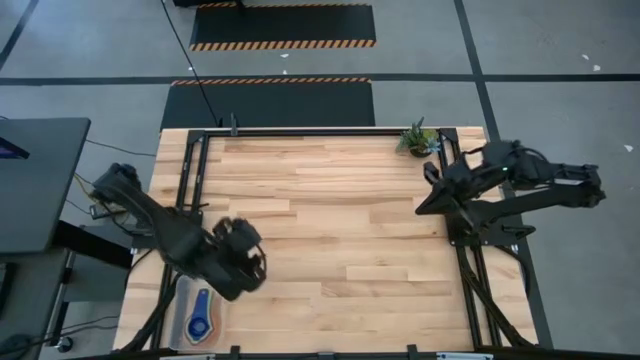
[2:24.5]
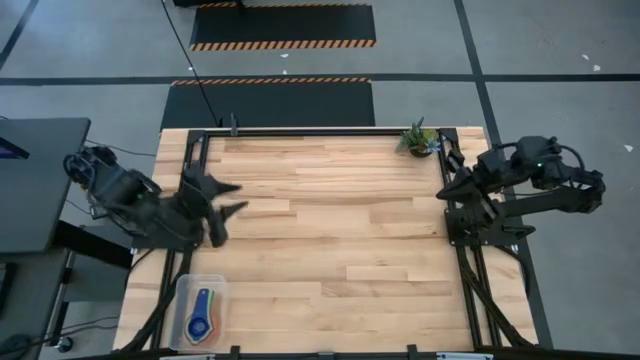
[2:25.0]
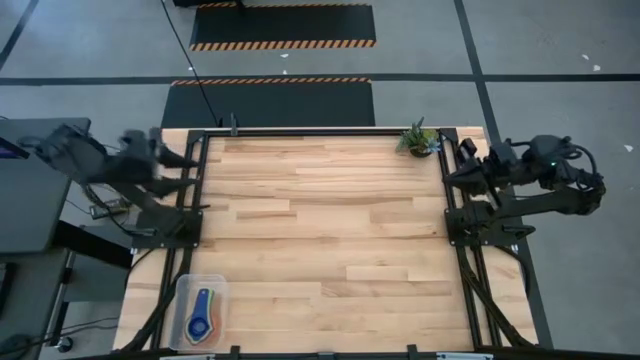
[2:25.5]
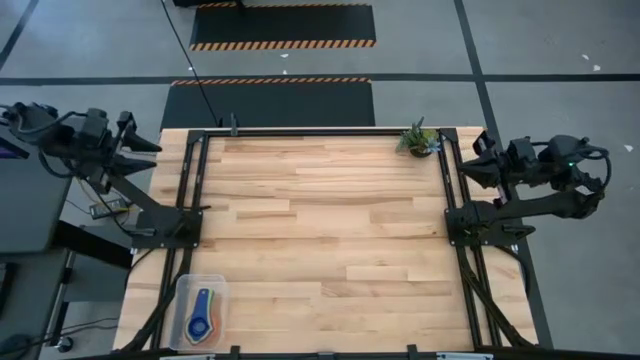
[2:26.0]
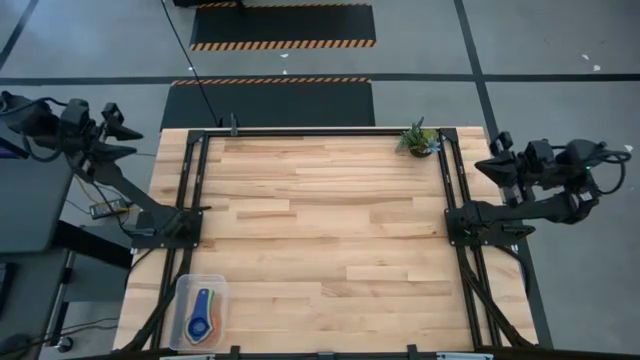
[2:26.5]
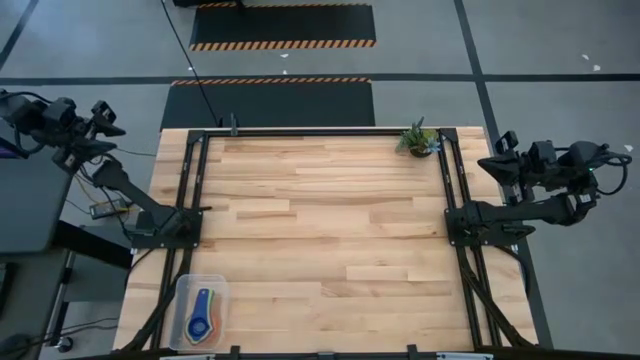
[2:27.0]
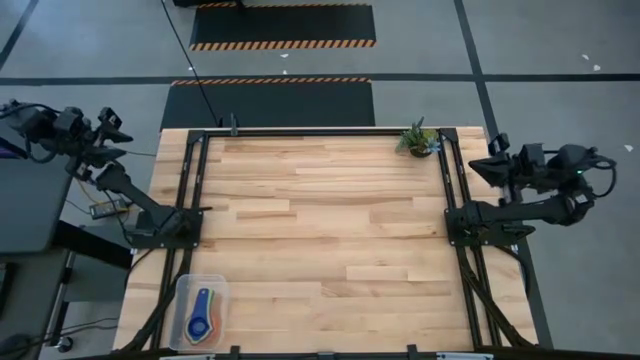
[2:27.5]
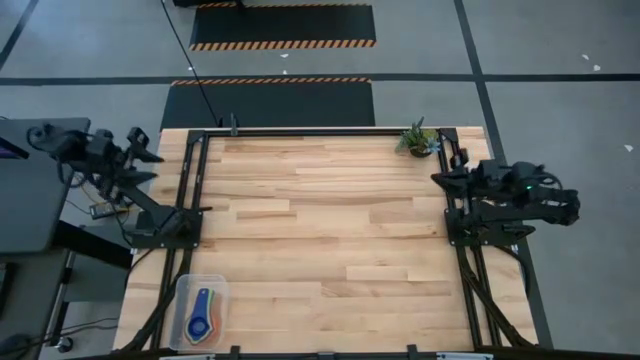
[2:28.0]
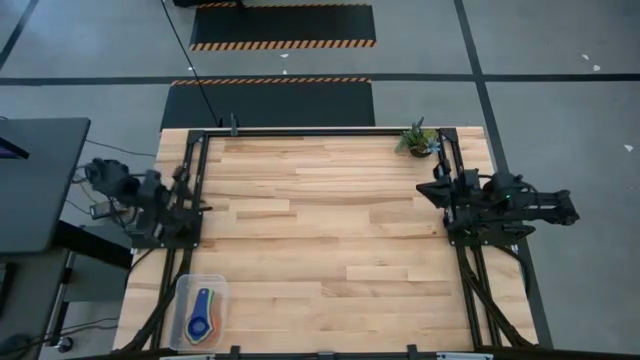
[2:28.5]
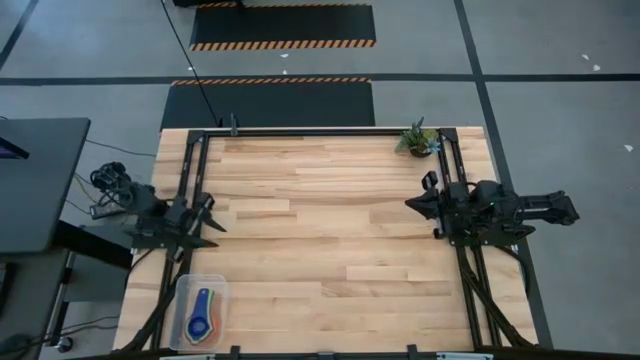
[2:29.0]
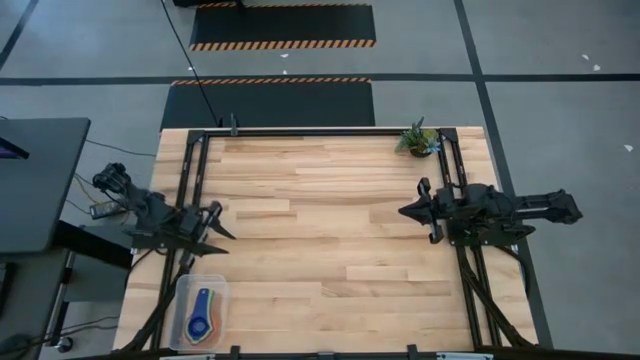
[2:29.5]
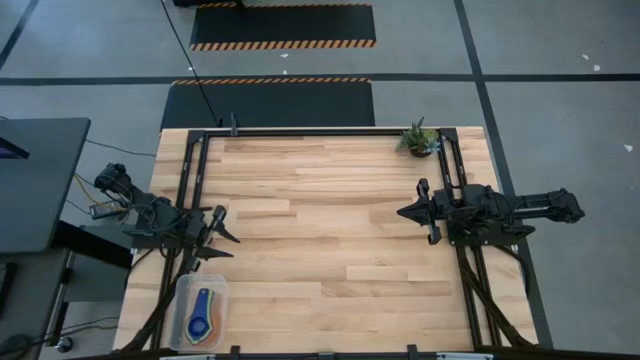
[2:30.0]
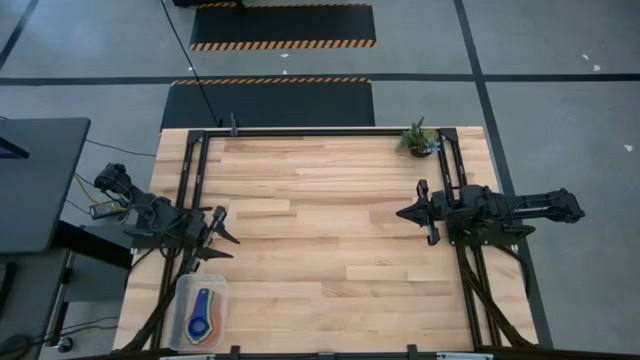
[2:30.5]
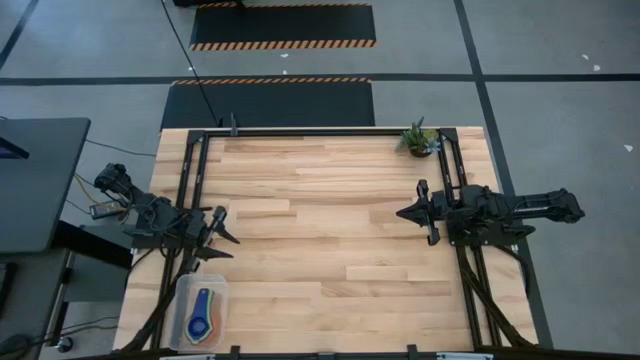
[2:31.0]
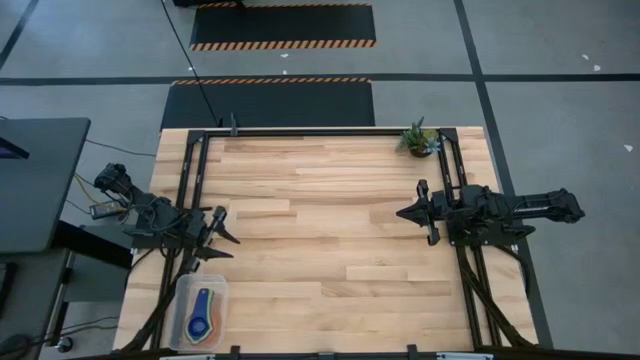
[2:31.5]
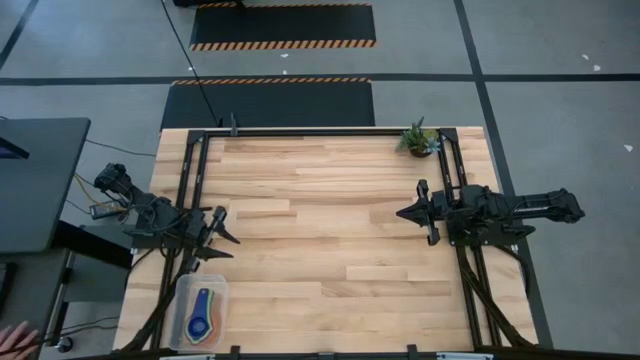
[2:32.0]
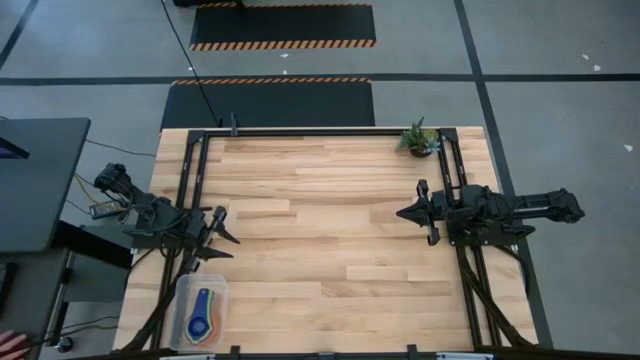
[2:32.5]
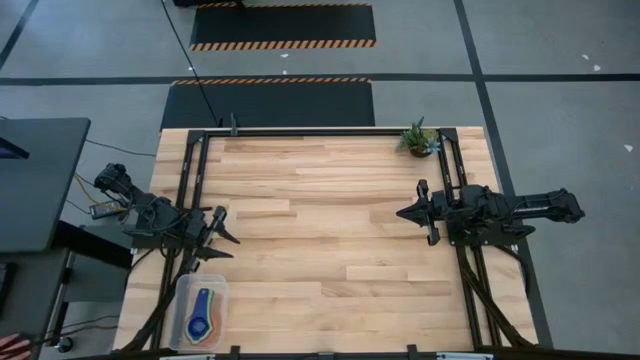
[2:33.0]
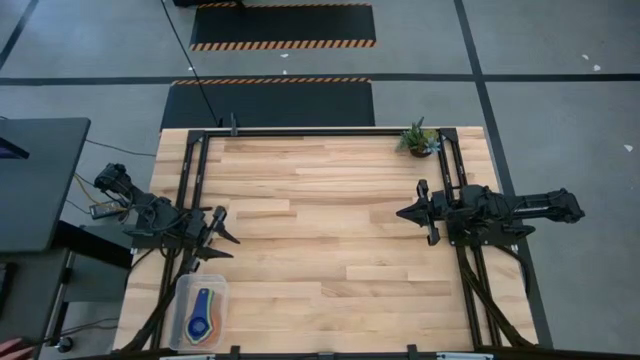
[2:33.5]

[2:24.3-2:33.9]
Task: Nest measuring cups in basket
Return to Home Position

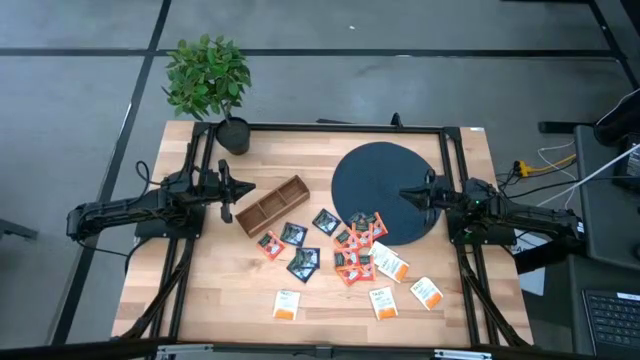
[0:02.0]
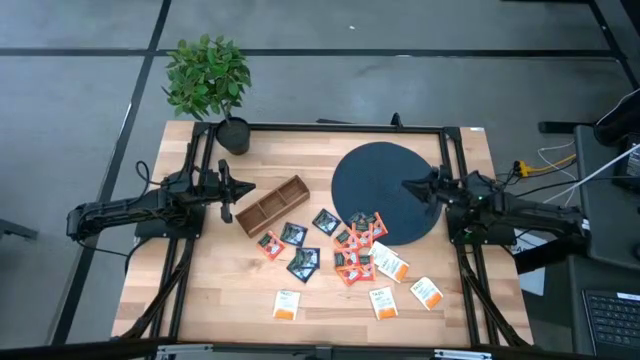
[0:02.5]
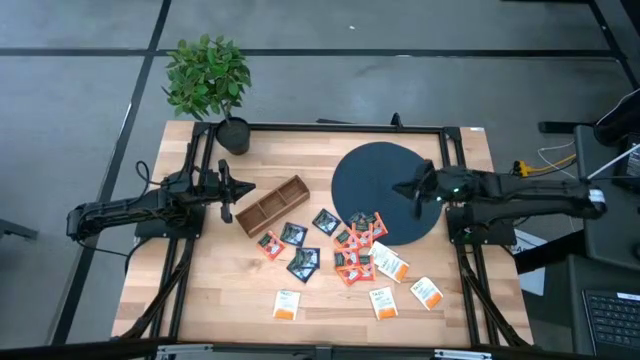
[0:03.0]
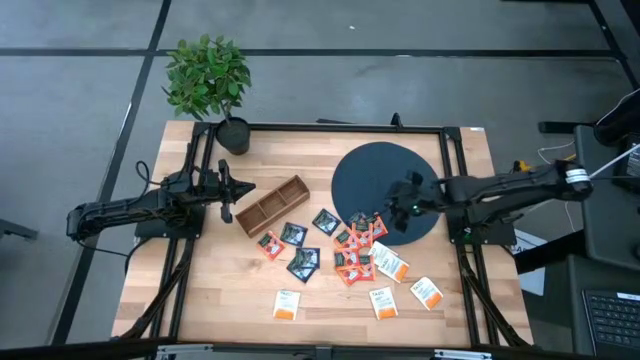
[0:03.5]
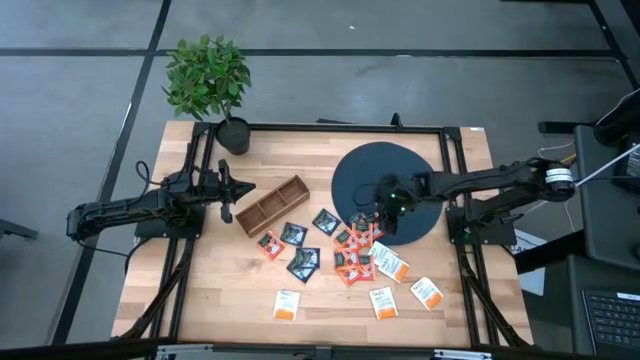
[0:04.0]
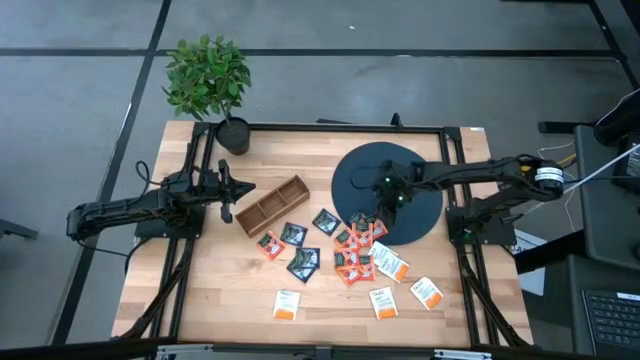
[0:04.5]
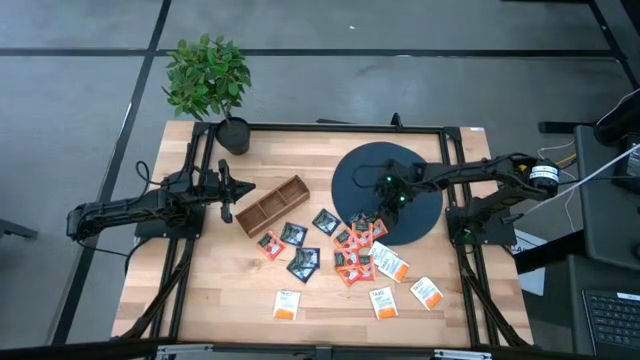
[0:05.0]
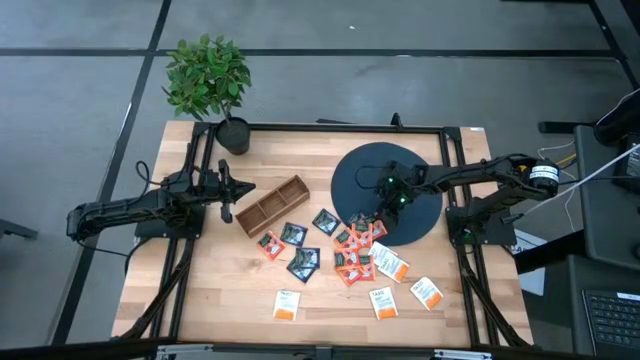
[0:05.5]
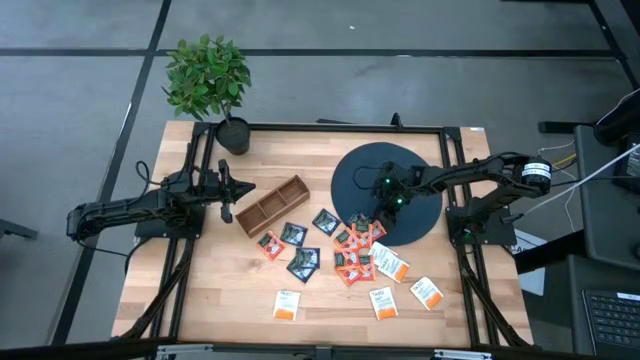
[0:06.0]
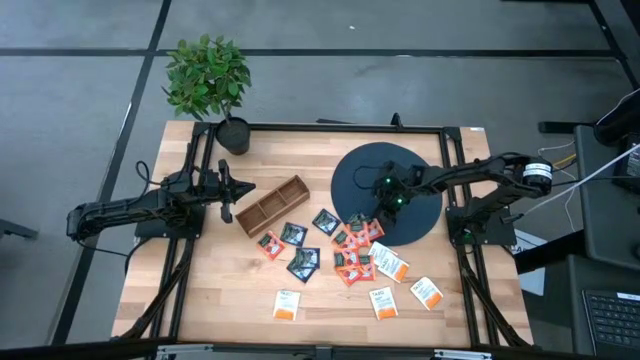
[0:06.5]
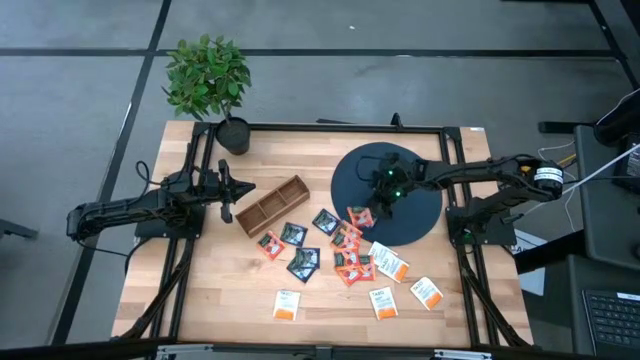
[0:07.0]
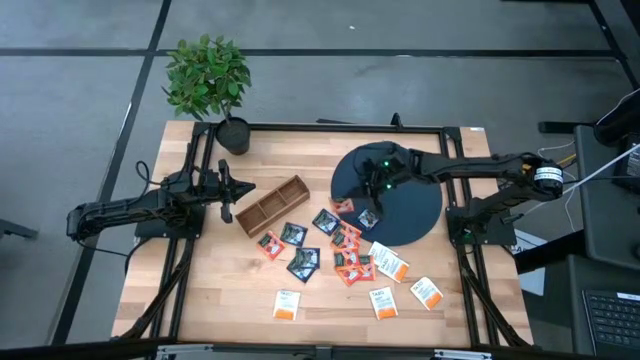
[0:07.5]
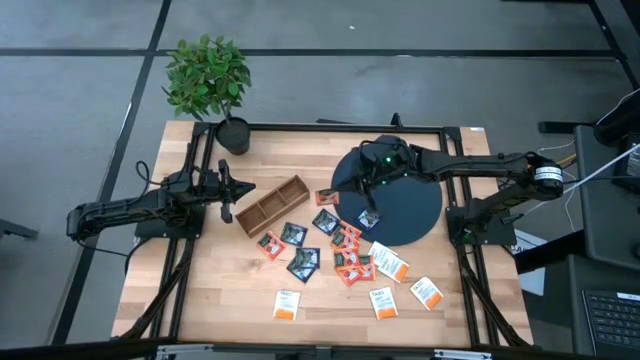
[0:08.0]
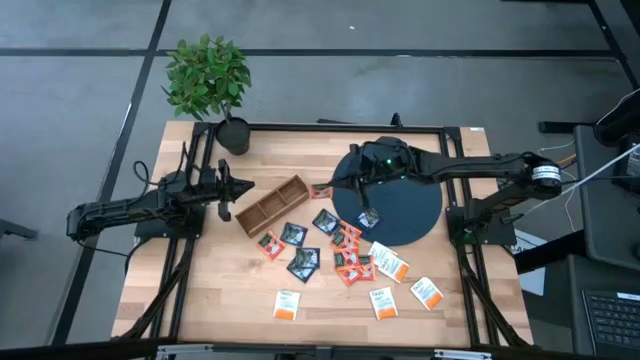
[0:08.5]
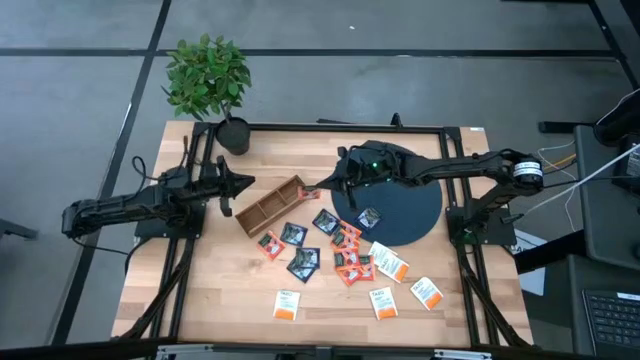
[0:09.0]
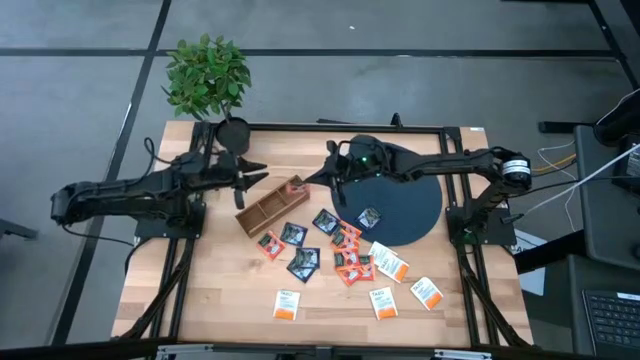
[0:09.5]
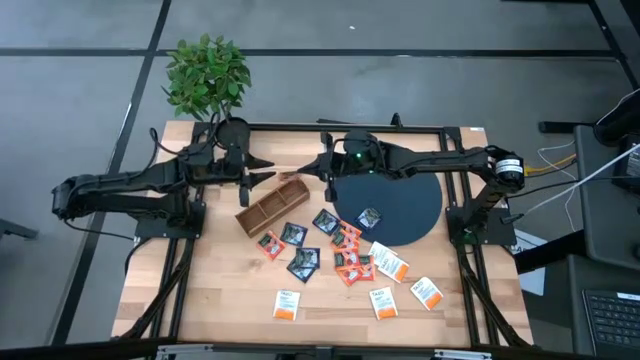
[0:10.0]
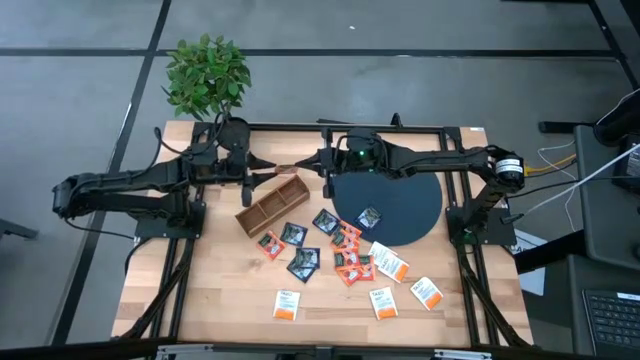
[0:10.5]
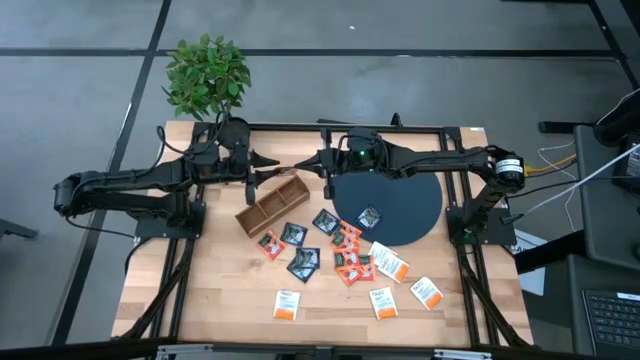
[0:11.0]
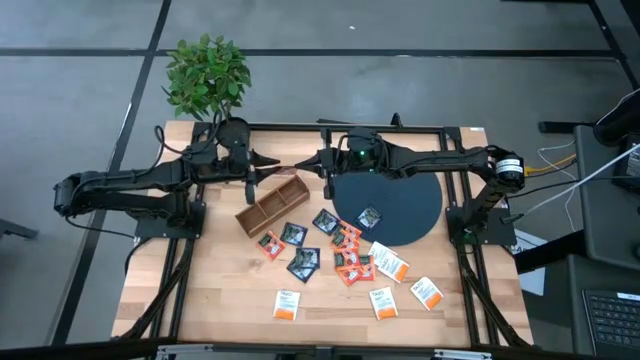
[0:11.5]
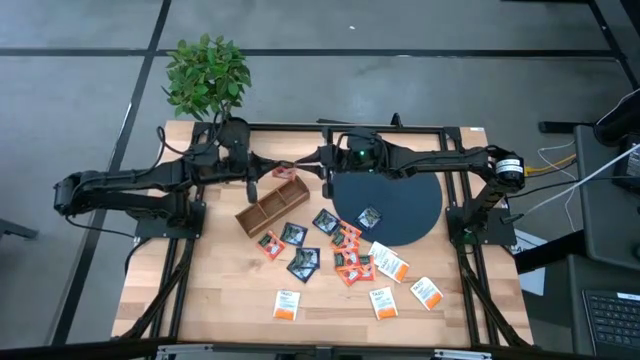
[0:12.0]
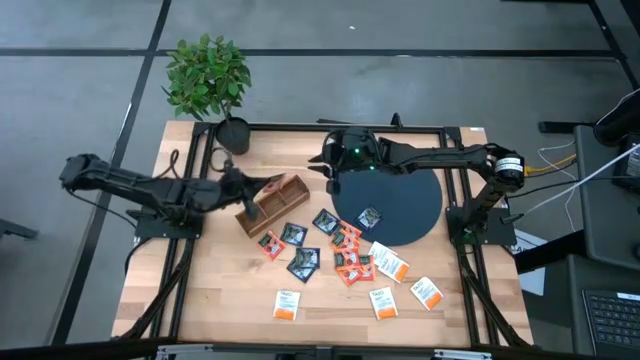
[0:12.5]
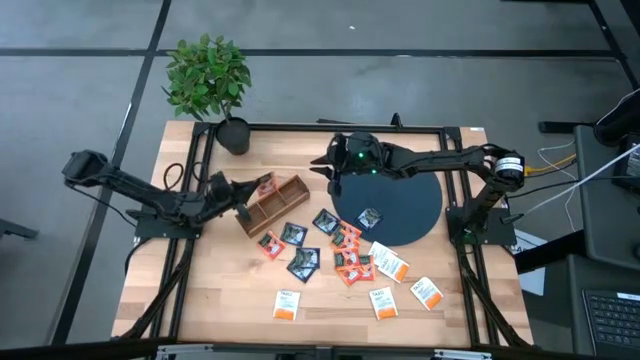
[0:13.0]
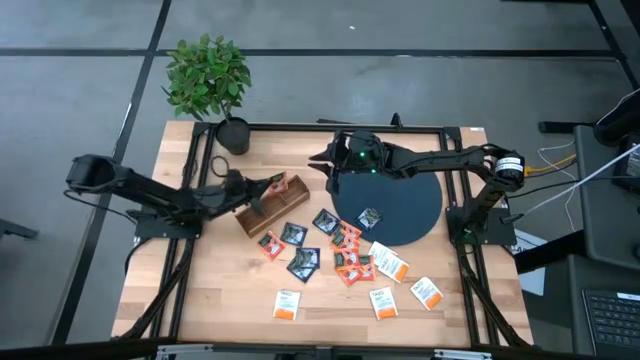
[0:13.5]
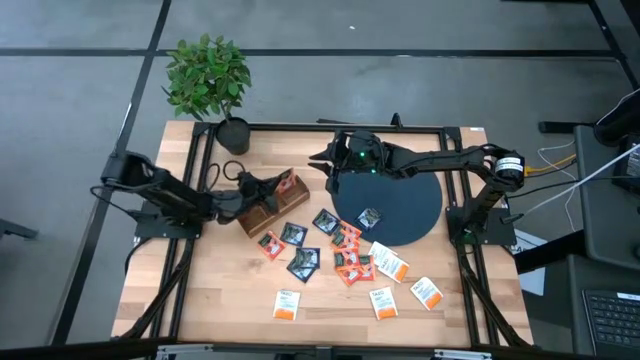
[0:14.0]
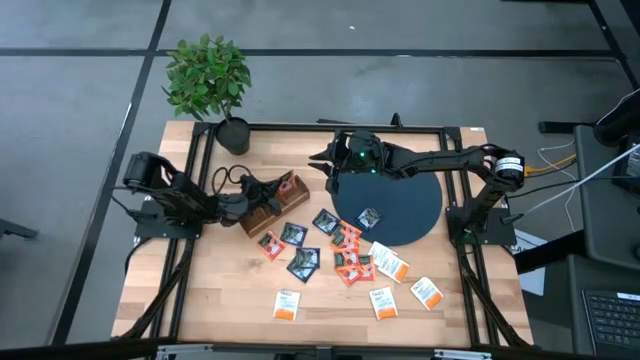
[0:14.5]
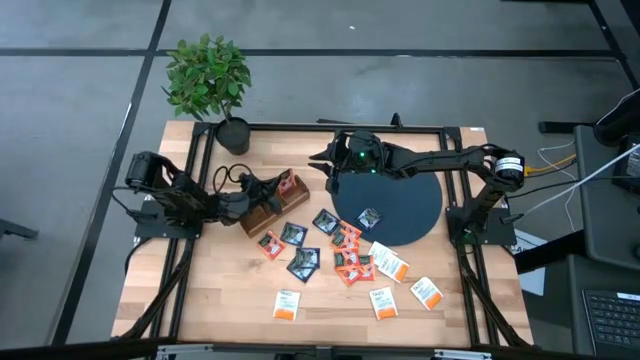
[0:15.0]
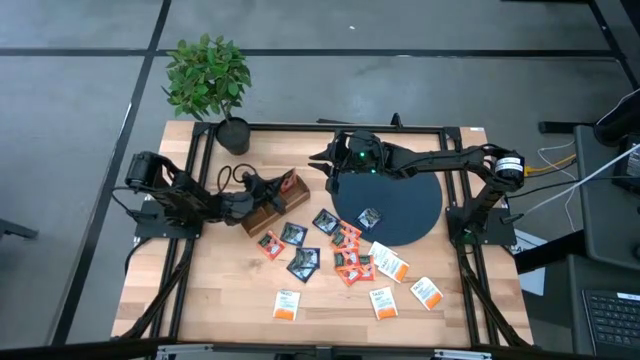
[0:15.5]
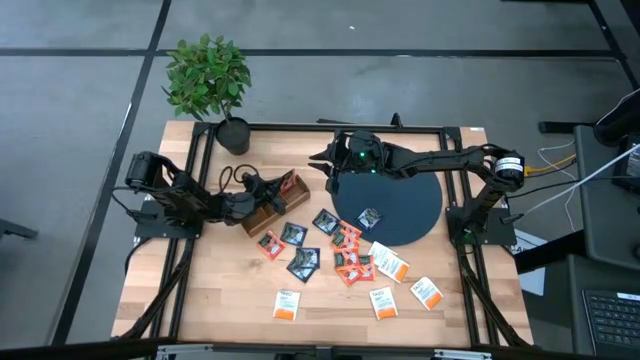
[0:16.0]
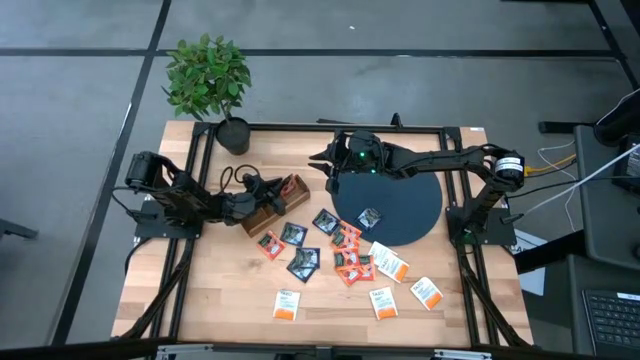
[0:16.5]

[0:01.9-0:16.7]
Task: Pick & Place Tea
Put the orange tea bag into the right section of the wooden organizer
